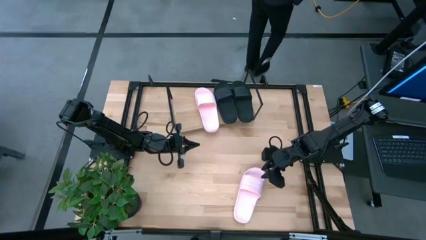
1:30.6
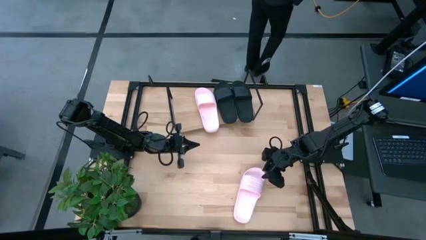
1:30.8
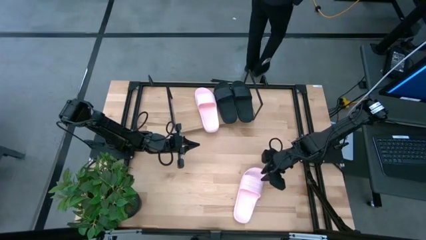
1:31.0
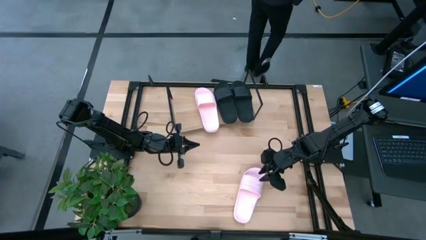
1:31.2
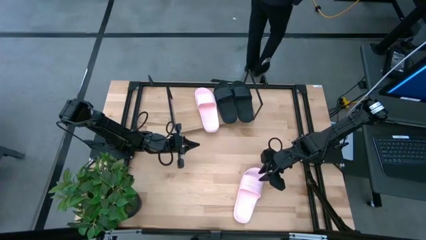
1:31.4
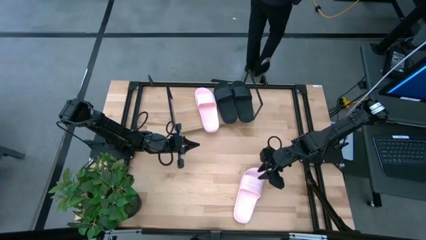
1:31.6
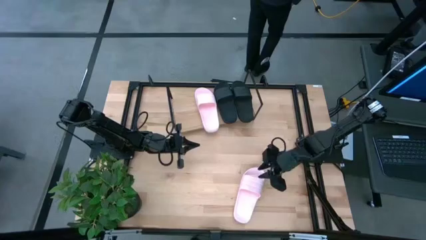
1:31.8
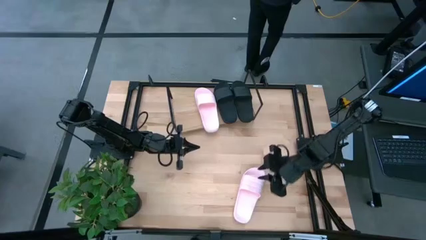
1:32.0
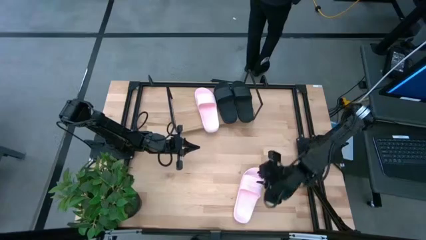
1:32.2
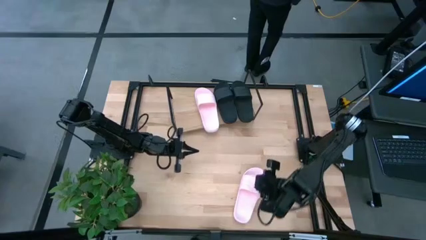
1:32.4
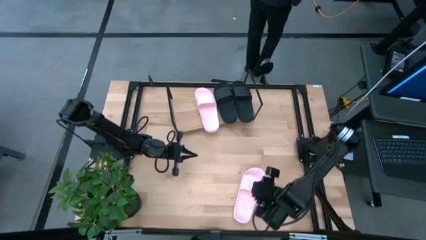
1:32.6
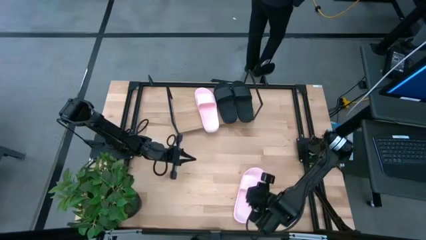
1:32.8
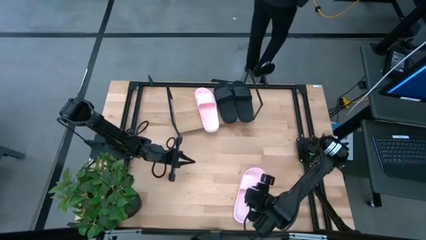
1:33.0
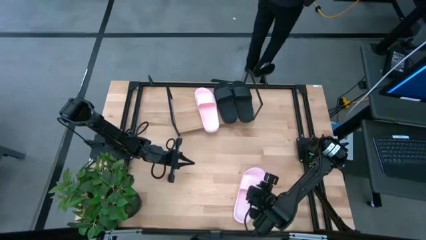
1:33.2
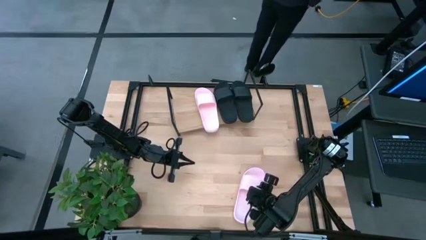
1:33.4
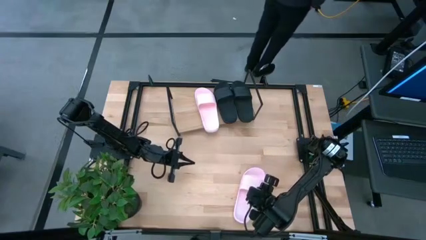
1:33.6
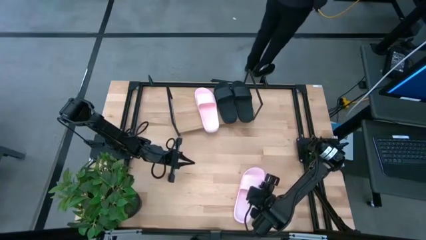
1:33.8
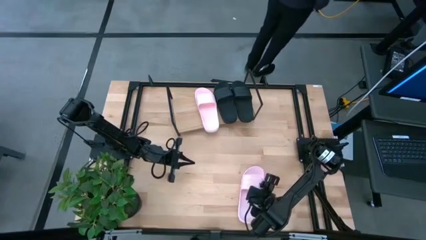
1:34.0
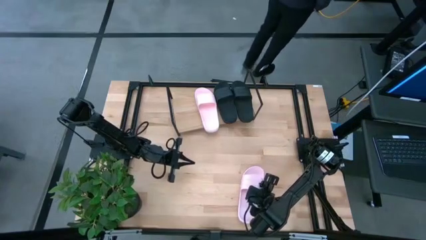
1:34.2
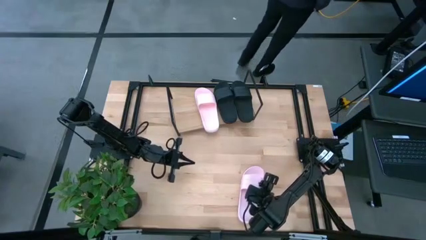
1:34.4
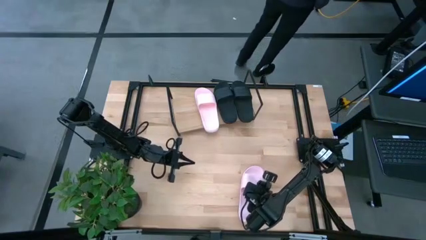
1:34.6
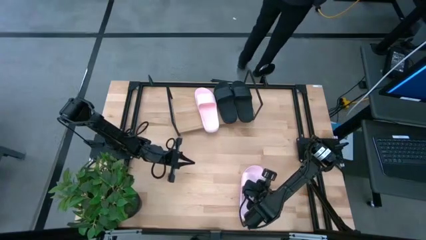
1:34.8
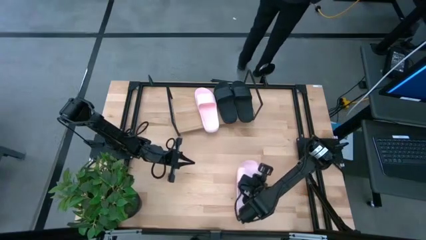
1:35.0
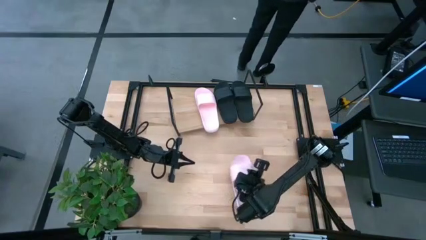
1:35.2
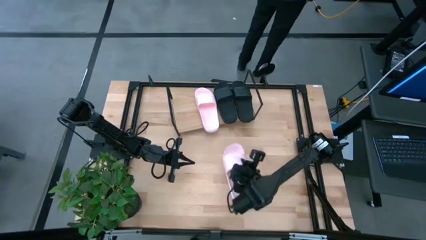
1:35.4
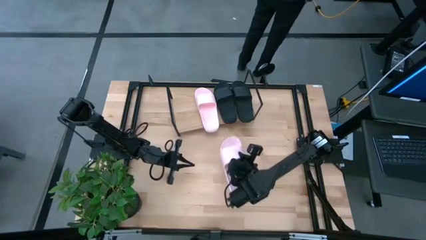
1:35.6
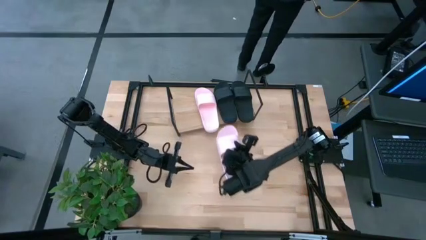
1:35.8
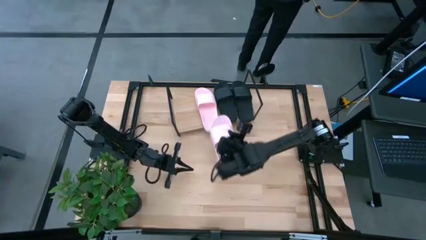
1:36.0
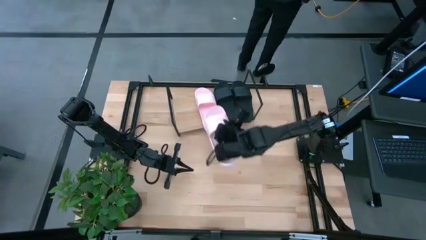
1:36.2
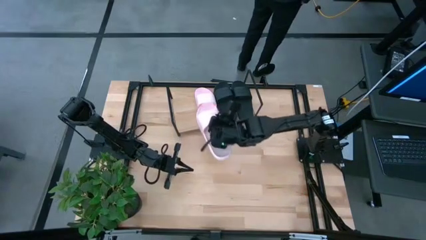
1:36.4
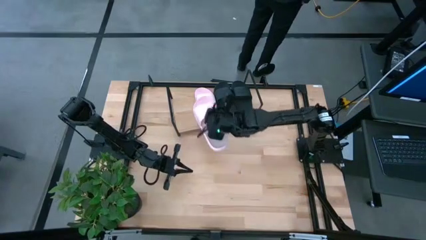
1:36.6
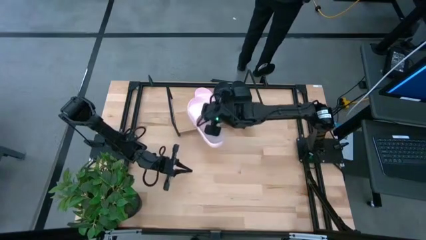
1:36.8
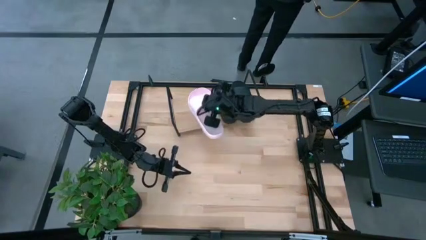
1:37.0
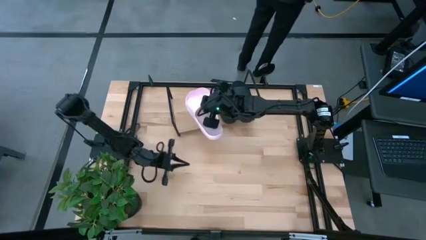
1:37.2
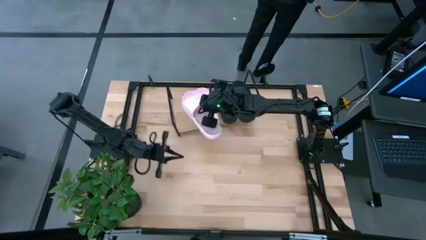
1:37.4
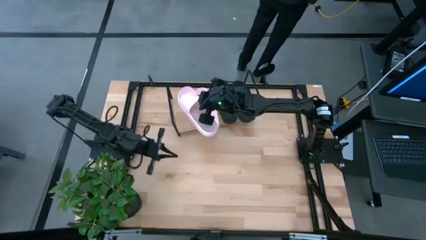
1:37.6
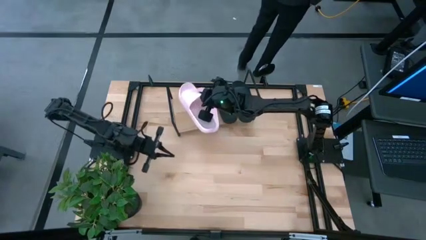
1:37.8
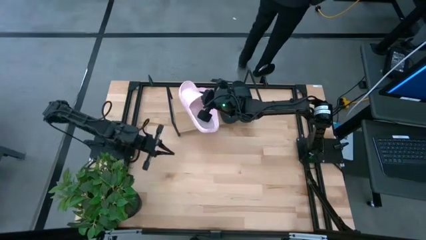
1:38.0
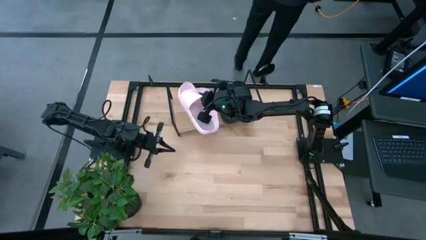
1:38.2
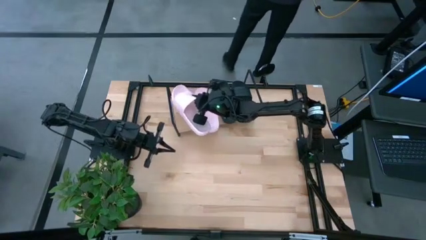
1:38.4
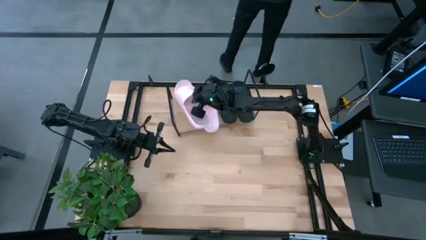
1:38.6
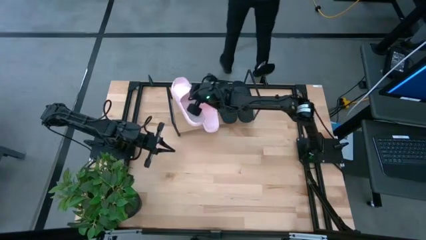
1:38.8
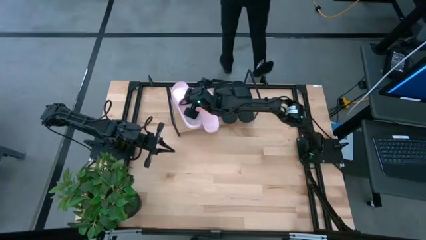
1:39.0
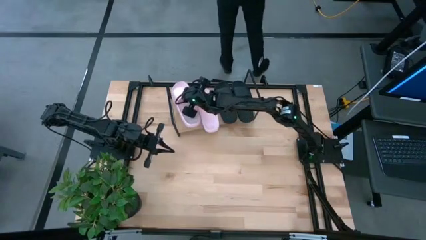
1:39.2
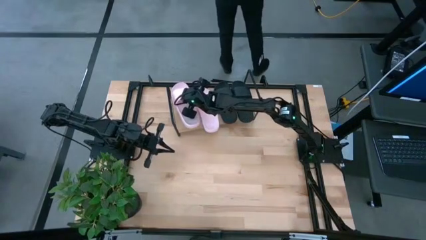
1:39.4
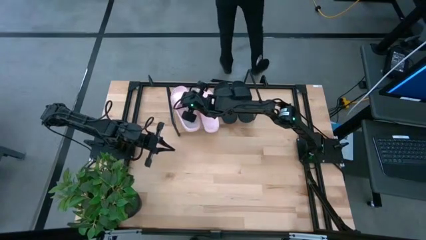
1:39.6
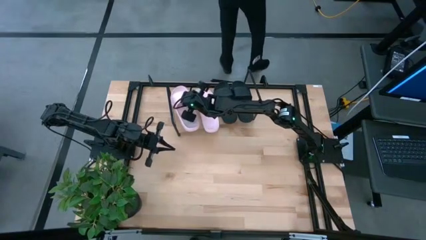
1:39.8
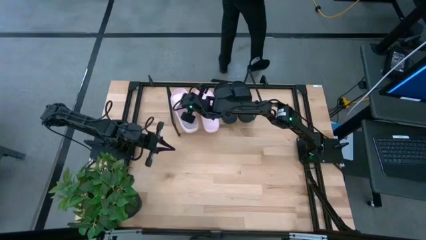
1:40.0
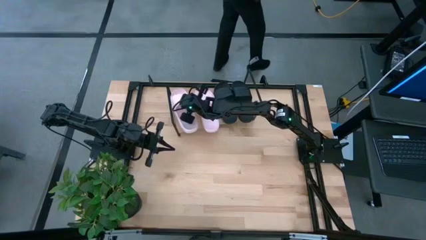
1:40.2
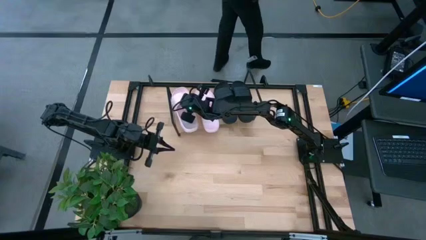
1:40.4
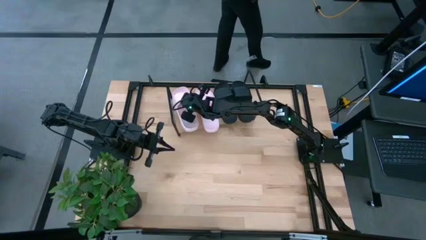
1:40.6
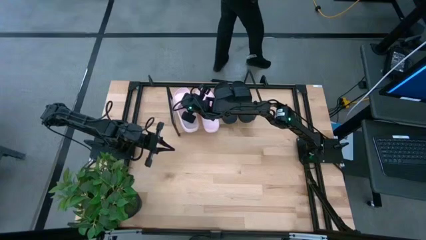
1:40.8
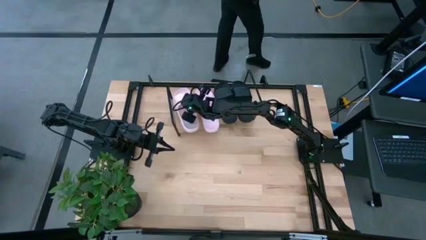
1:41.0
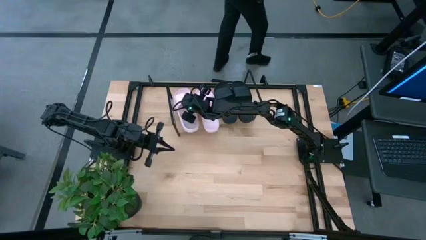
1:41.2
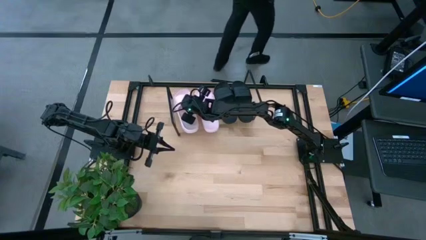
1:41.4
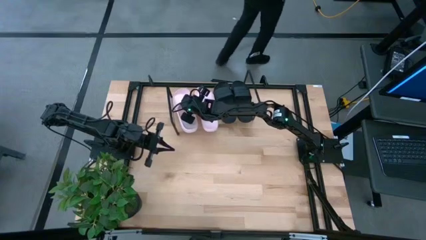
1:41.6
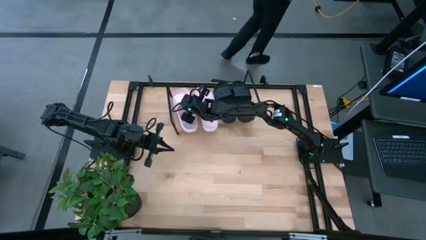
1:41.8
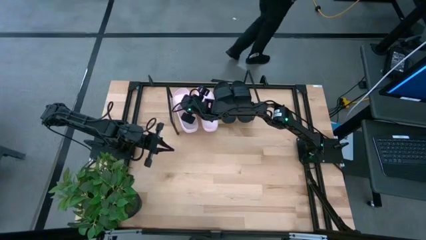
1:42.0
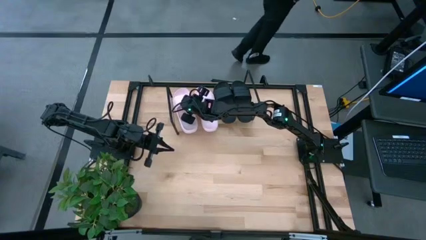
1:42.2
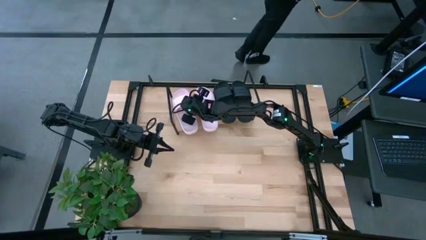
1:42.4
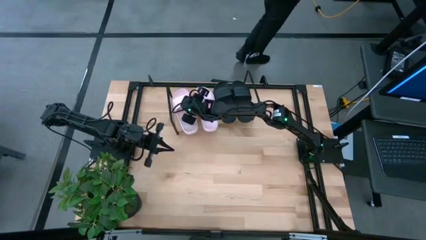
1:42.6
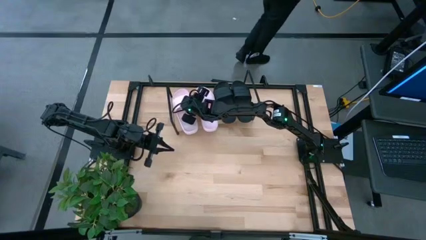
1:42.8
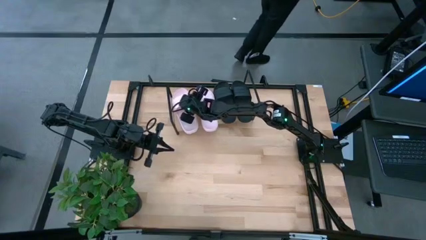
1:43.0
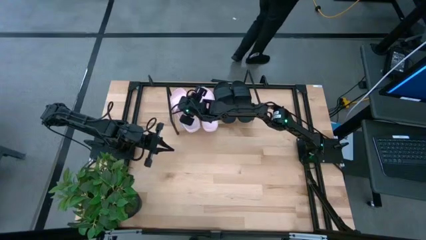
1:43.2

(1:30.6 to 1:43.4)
Task: Pick and place slides into the shelf
Put the pink slipper on the shelf
